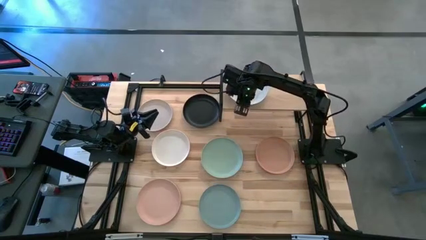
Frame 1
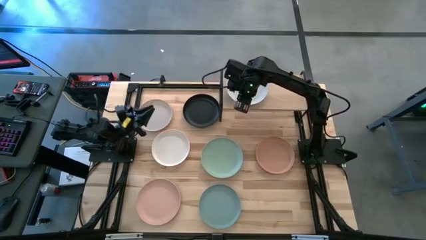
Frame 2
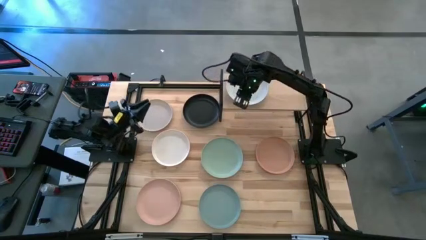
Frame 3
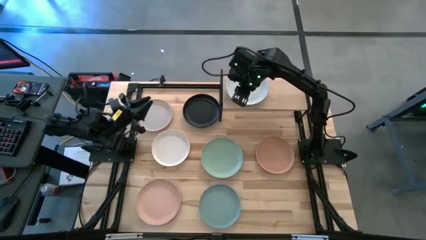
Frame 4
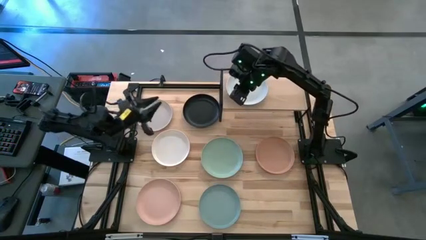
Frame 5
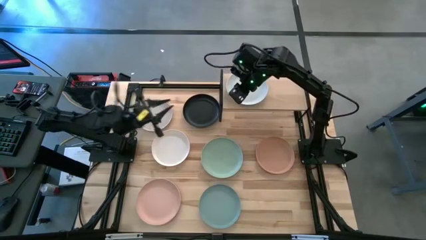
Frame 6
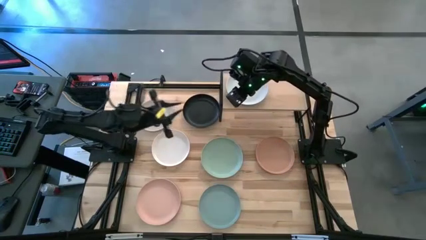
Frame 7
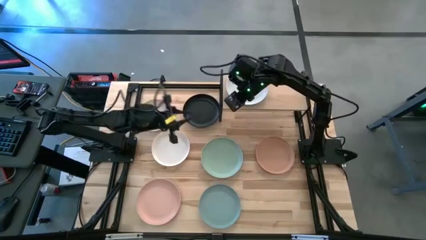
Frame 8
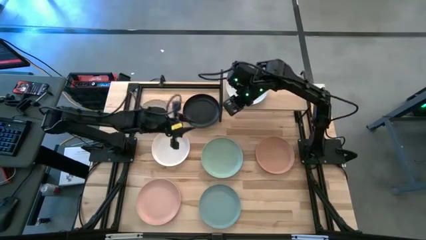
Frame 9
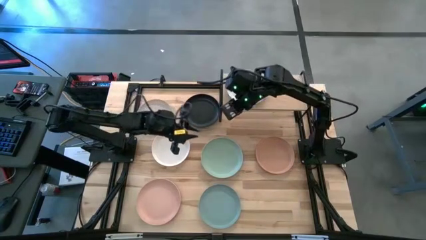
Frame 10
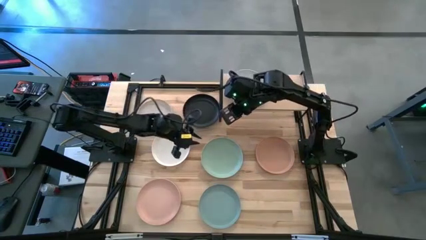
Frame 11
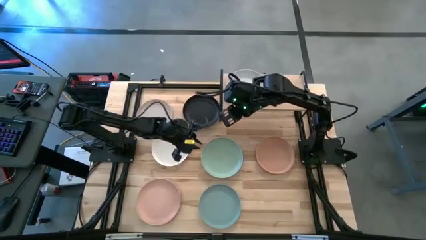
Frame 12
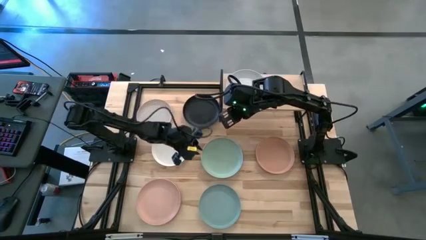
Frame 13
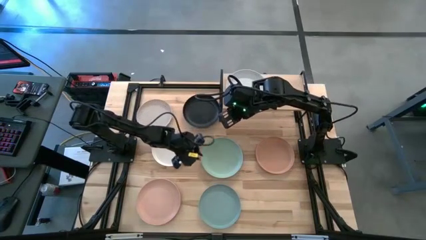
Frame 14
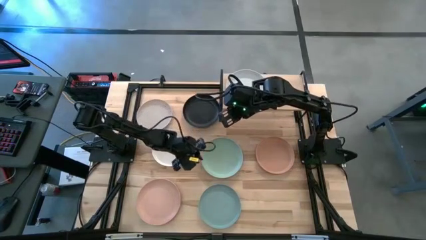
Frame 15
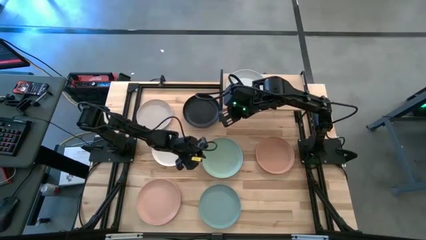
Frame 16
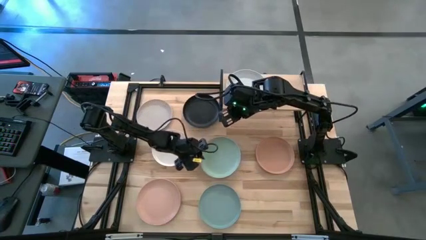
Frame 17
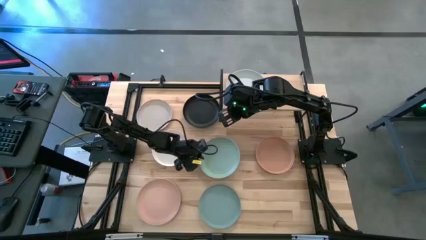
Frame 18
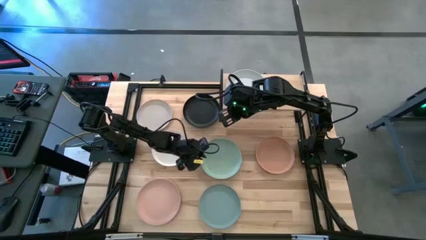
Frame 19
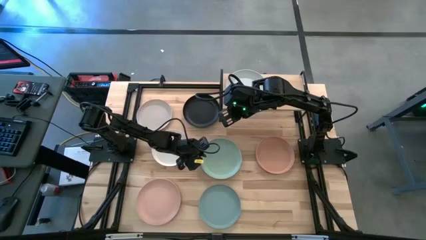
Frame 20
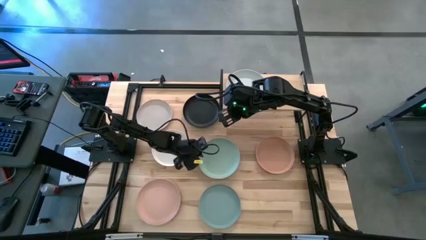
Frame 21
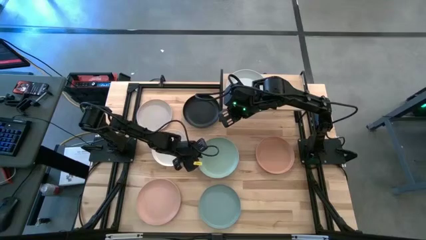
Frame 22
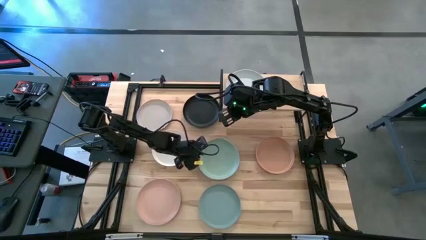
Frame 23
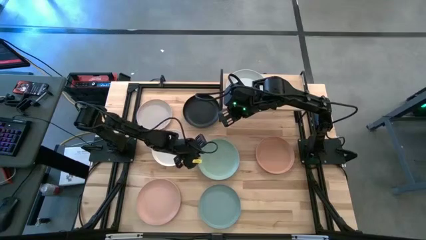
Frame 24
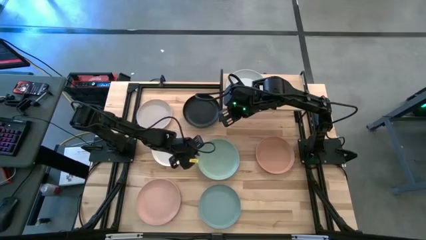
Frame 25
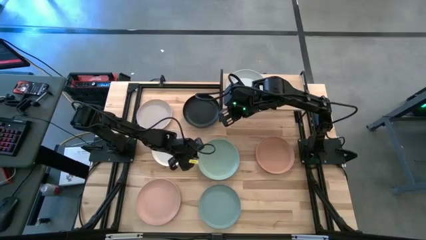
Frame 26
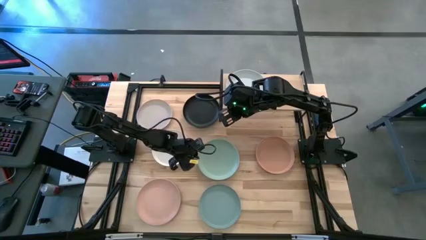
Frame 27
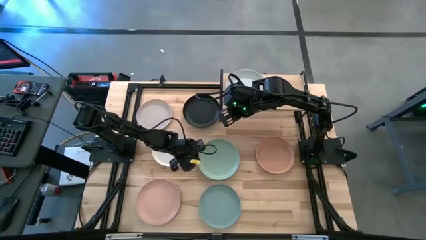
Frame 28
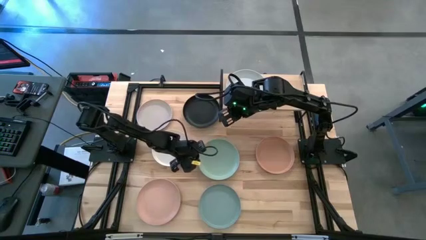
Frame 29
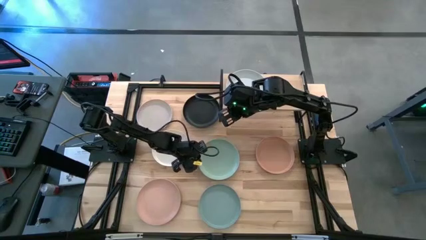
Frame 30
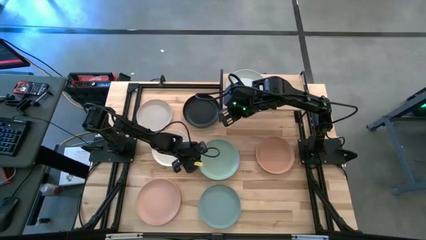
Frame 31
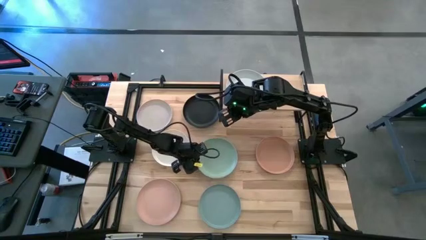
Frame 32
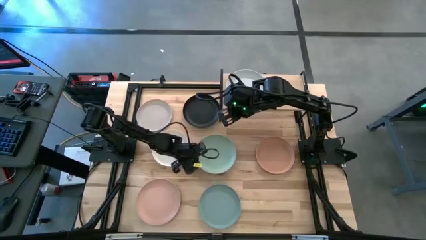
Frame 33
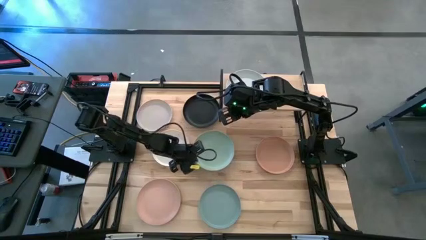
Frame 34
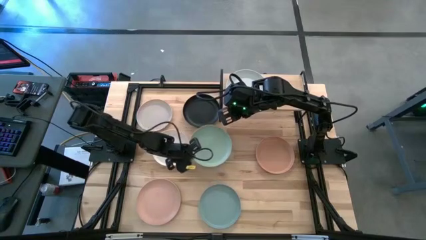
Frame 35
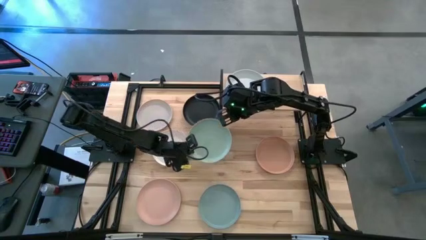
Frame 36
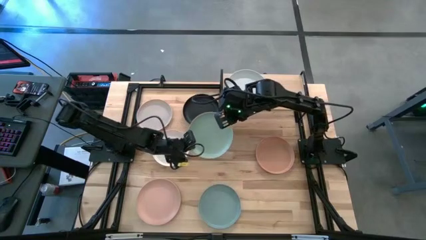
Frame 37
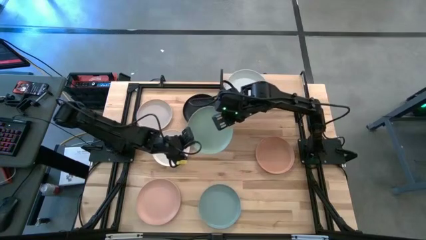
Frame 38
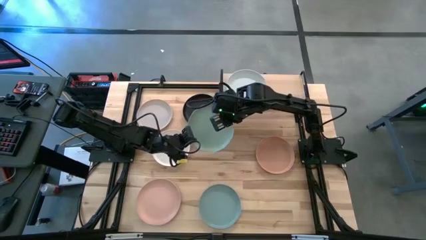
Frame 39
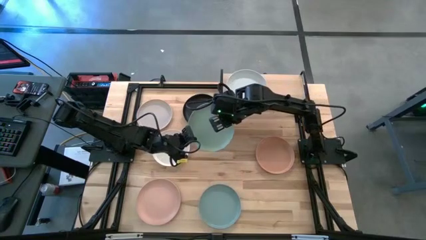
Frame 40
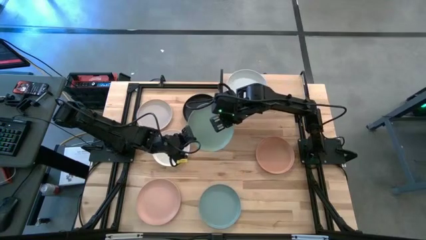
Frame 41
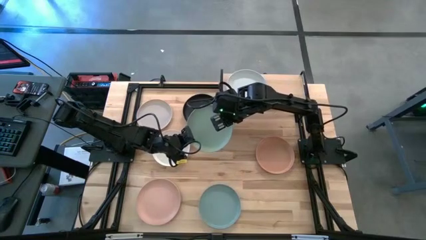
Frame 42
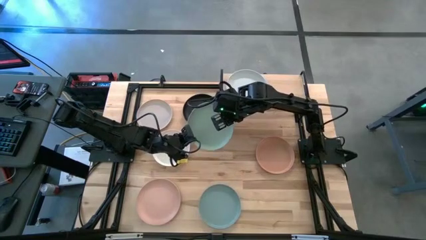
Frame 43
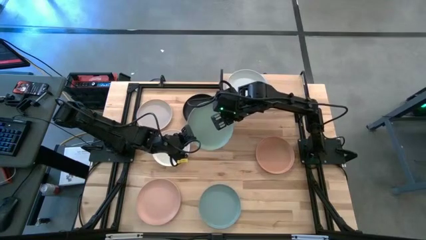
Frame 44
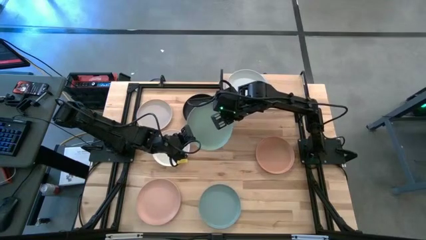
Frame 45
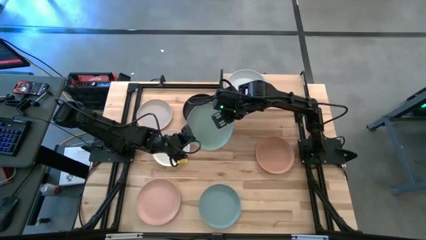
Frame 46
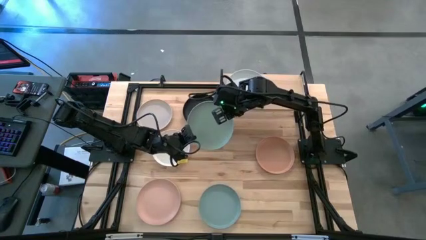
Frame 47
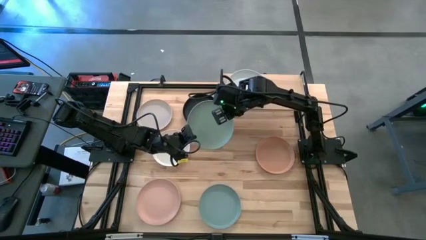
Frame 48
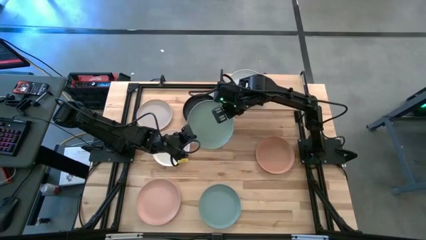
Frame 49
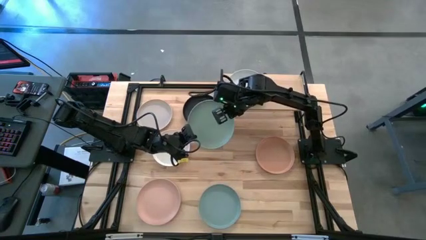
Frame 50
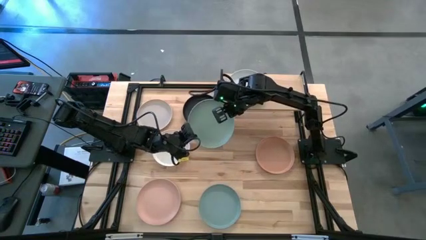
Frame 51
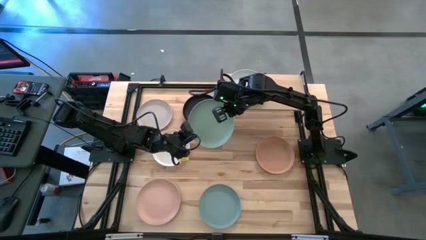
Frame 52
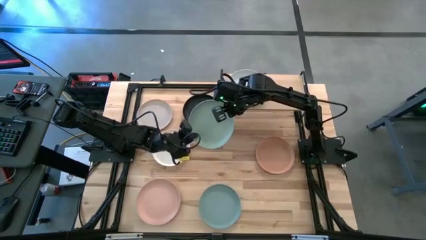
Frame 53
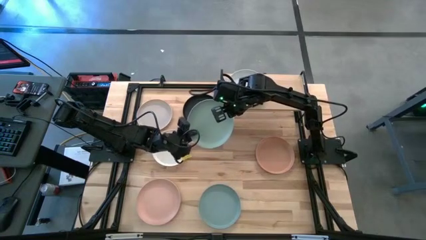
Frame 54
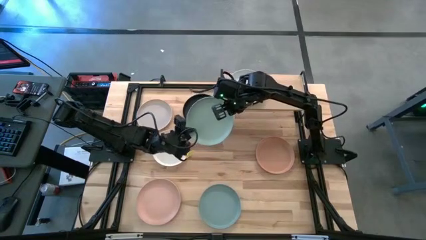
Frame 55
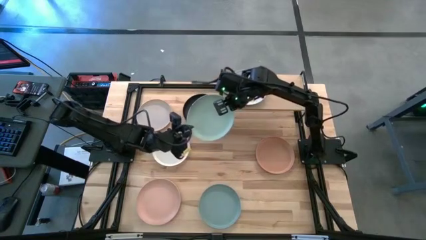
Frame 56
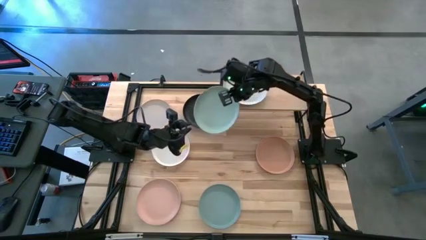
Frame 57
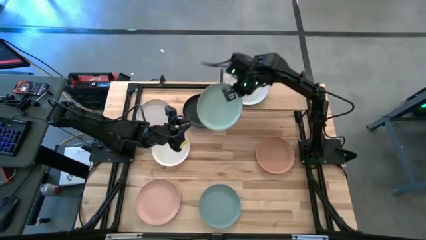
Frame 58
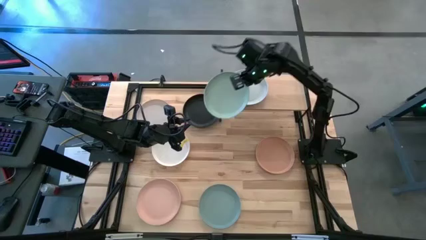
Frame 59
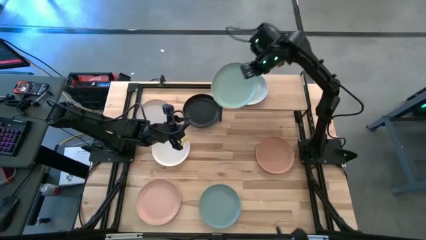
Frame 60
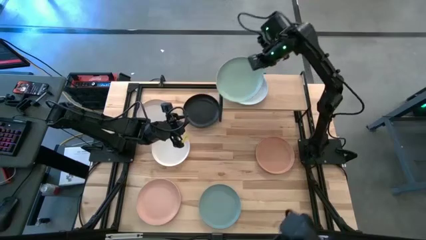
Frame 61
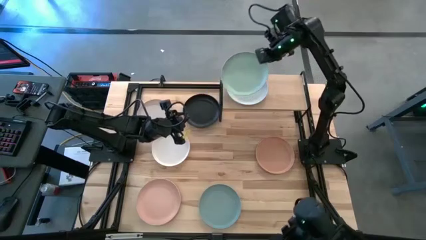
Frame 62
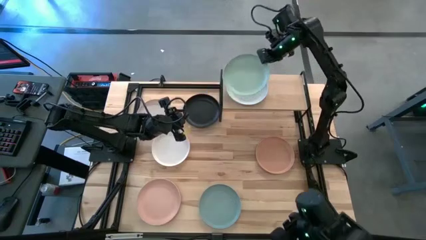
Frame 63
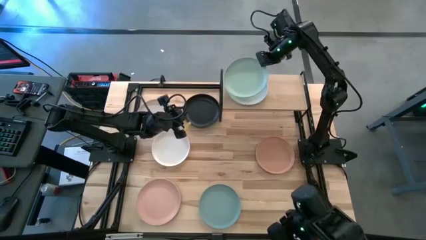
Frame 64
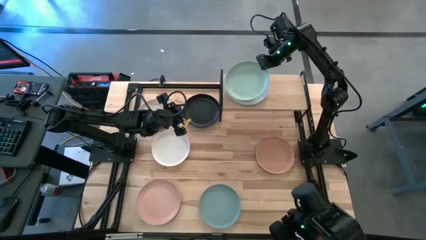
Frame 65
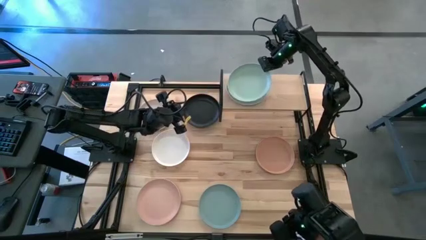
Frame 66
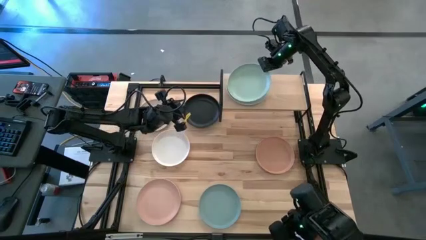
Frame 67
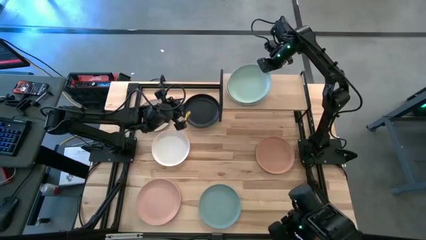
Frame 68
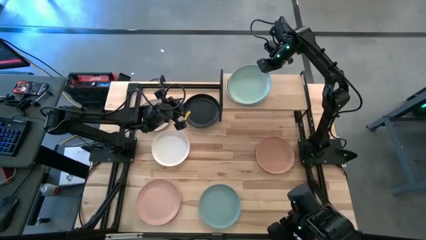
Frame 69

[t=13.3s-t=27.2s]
Task: Place and stack plates onto a shelf
Stack the green plate on top of the white plate on the shelf

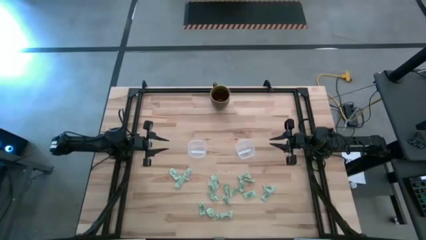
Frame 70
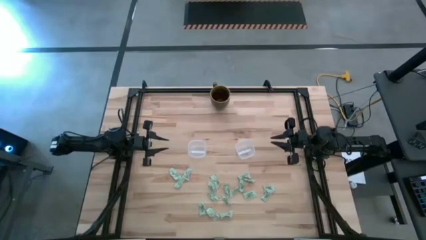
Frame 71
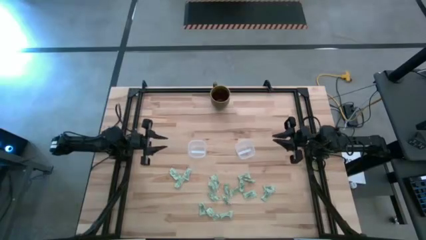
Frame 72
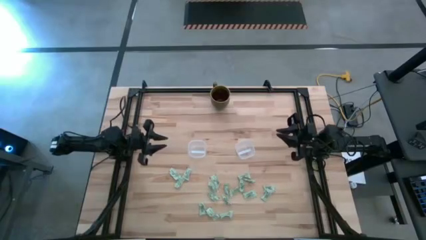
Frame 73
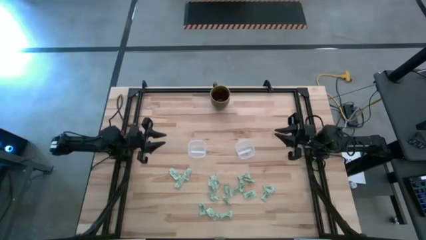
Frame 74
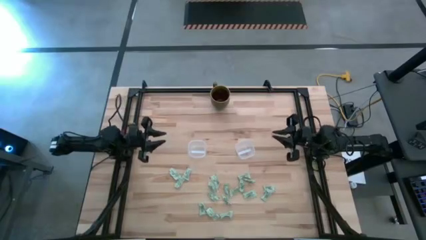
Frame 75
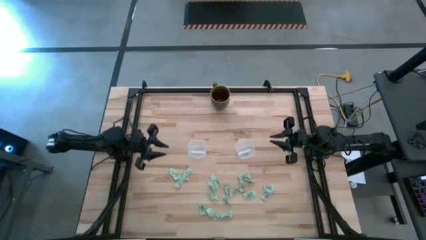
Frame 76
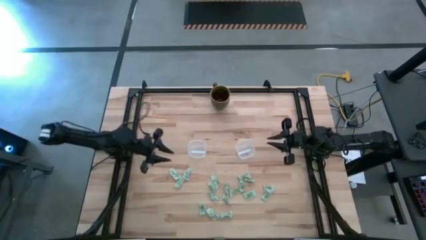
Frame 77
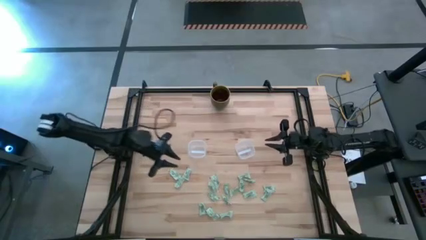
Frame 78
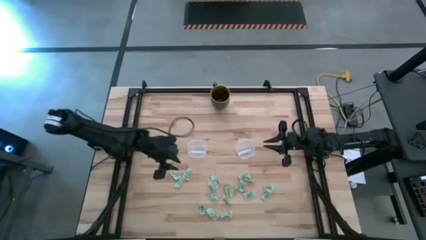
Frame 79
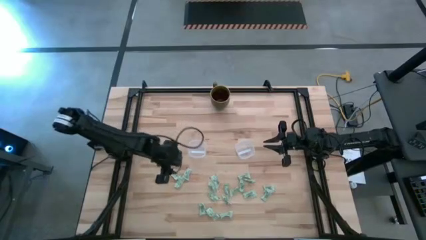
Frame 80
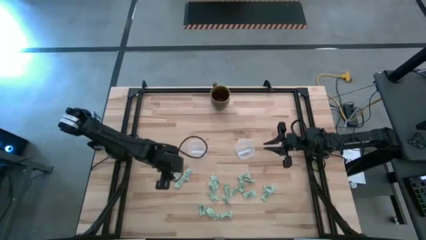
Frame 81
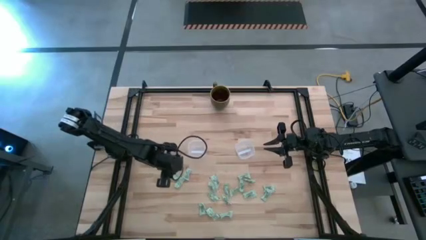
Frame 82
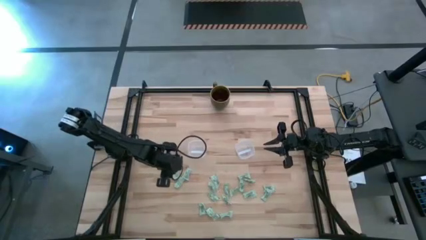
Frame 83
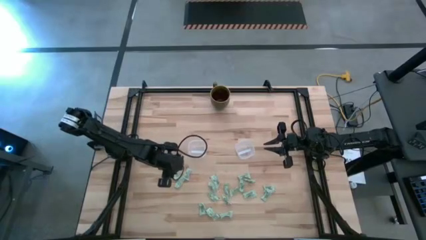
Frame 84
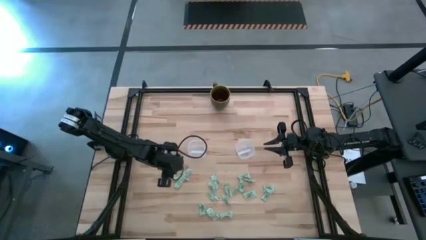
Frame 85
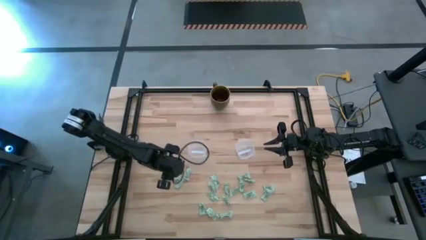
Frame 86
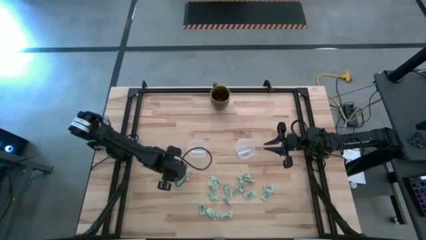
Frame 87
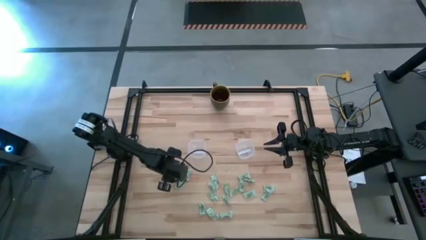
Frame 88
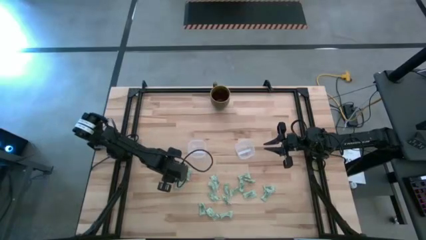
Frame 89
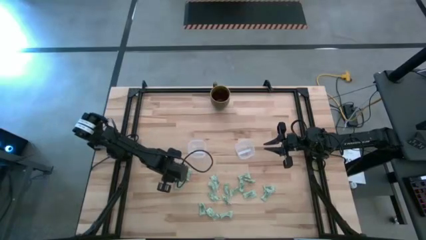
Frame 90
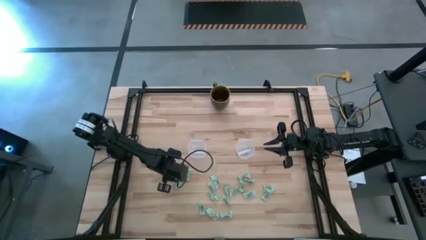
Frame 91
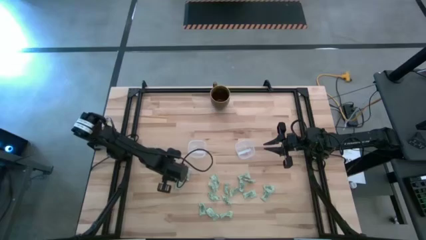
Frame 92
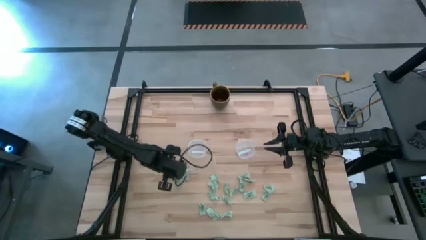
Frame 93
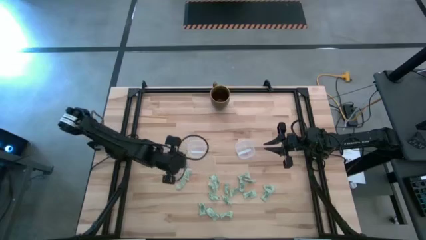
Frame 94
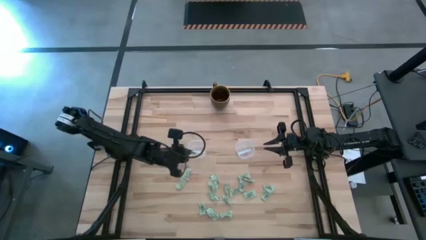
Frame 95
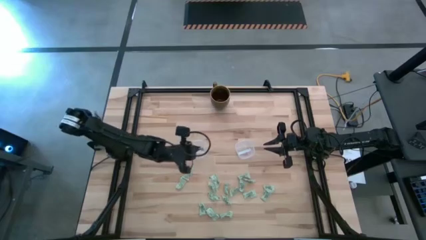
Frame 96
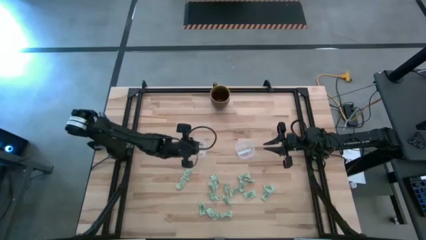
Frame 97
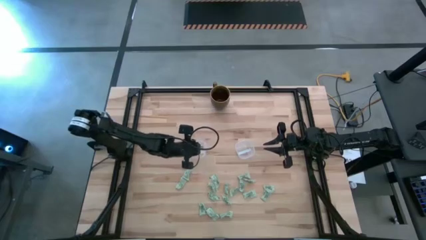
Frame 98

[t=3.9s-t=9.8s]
Task: Pick and place Stevia / Truvia into bins
Put the white stevia packet into the left transparent container
